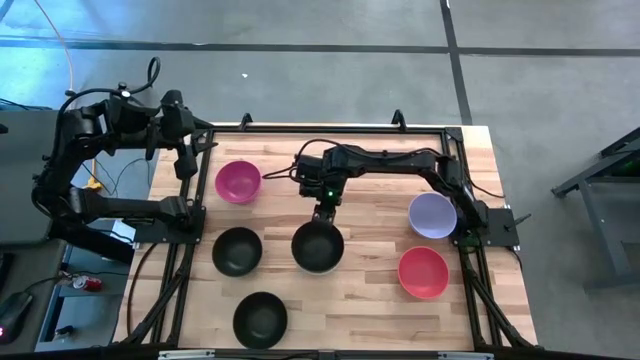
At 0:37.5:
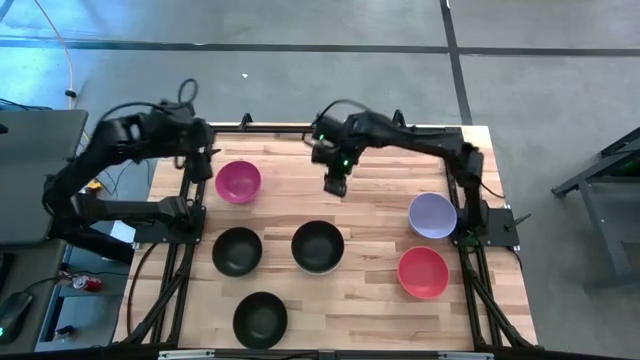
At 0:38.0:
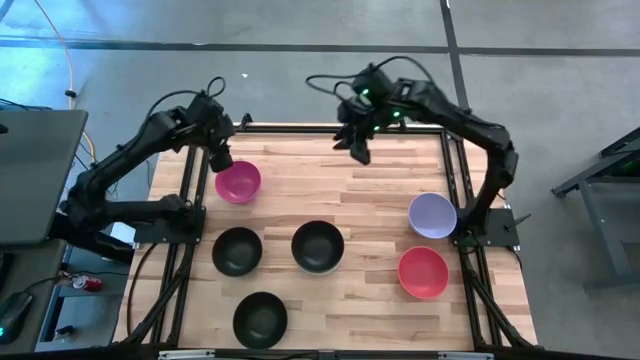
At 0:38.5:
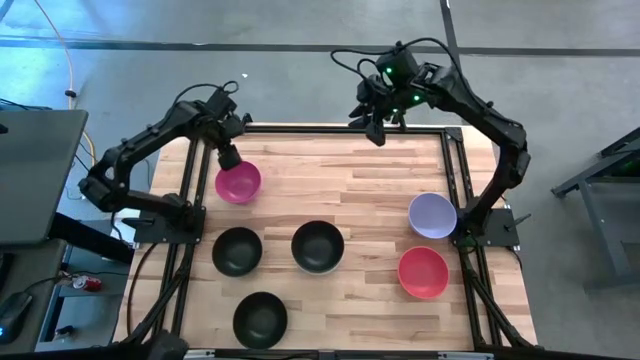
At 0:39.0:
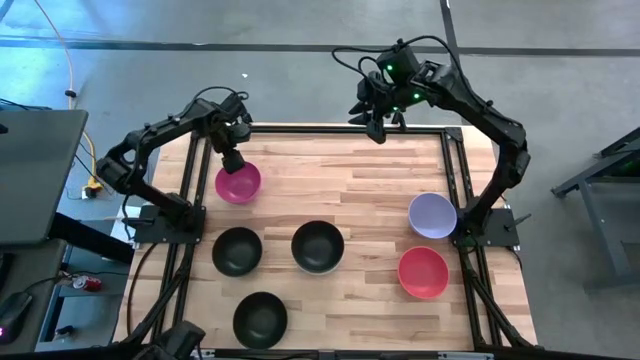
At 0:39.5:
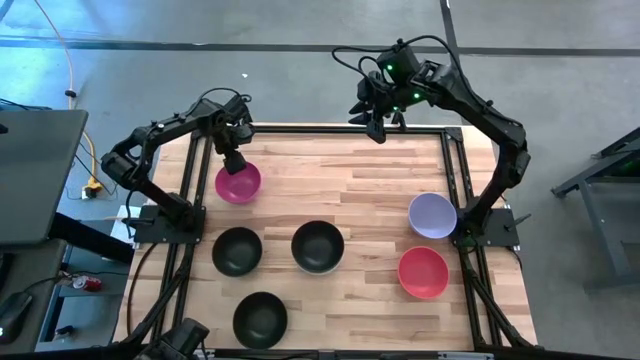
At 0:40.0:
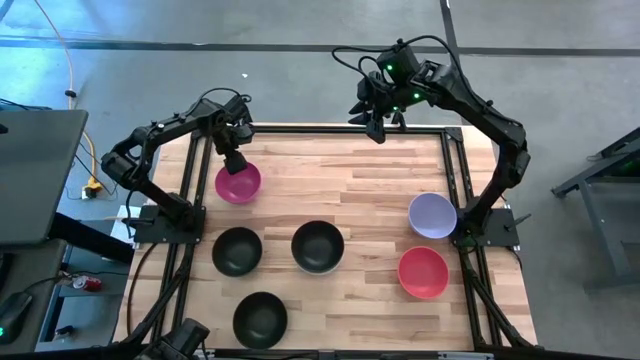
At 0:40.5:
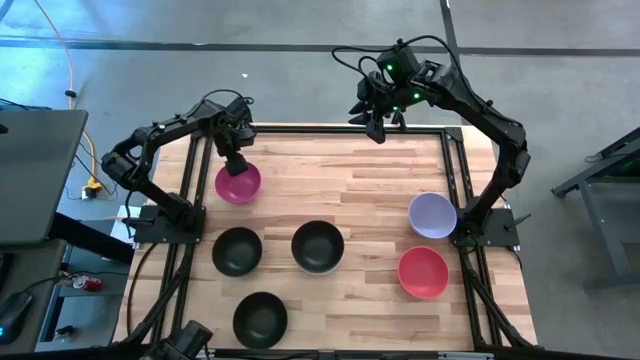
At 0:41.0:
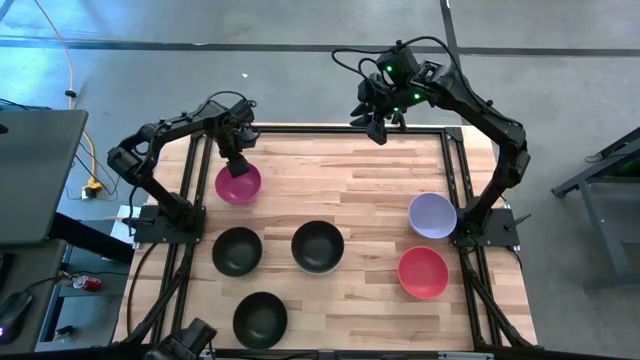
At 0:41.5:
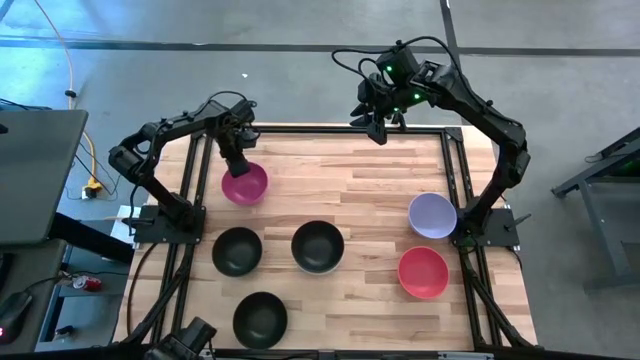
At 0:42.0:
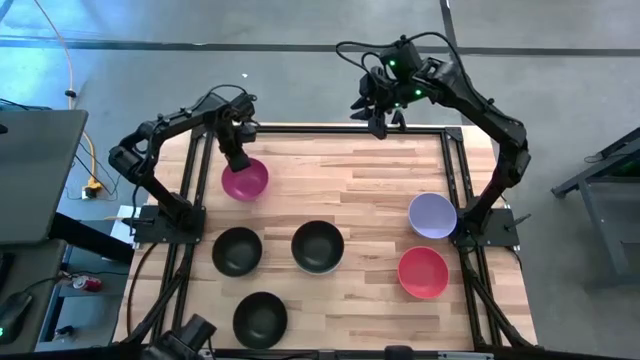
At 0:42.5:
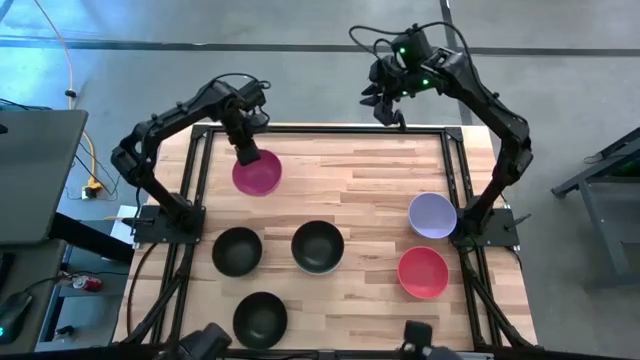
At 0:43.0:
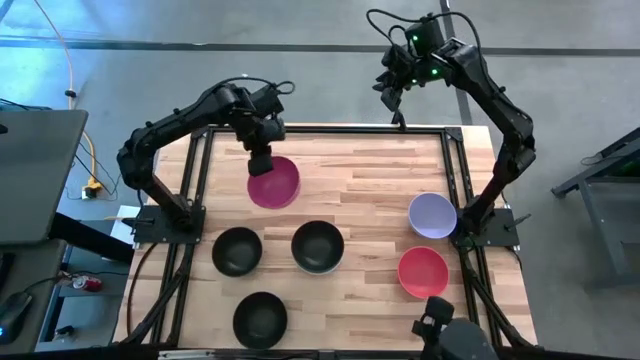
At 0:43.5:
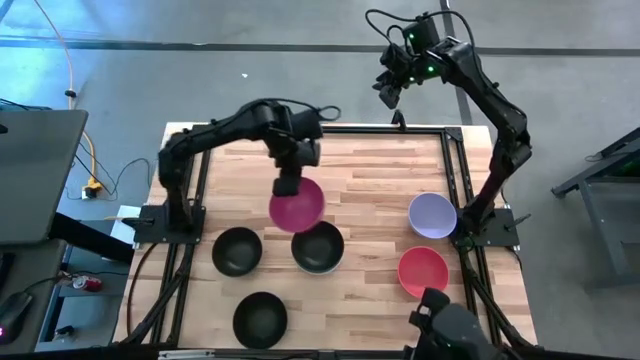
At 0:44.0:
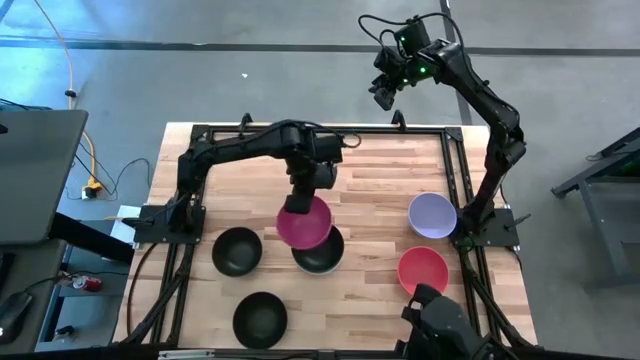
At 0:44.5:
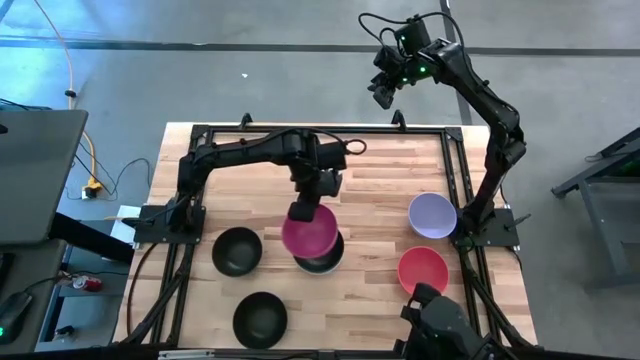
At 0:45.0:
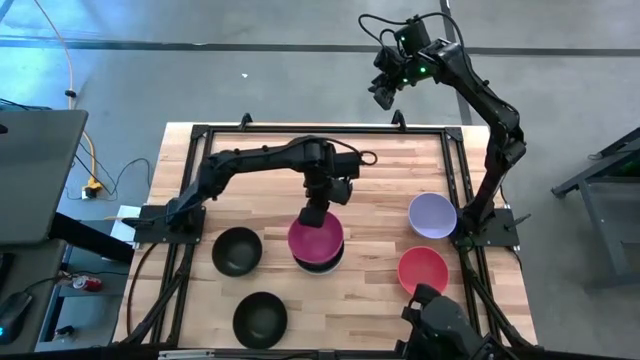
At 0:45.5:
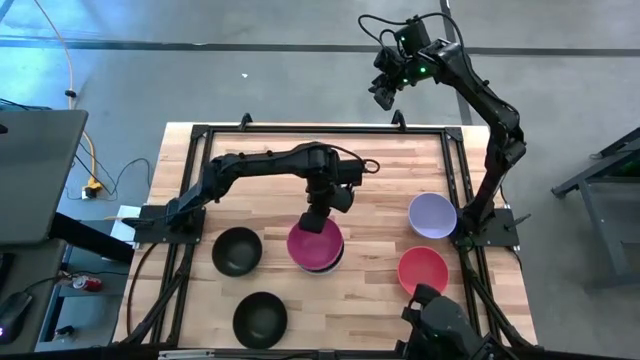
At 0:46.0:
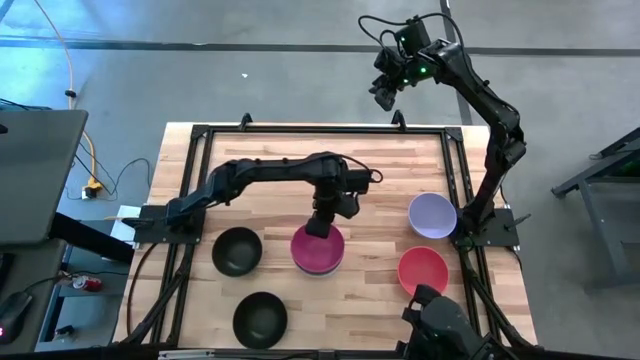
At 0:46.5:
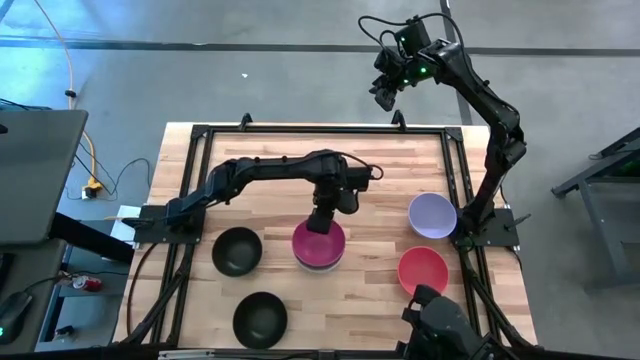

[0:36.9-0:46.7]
Task: Nest bowls inside each other
Stack the pink bowl on top of the black bowl

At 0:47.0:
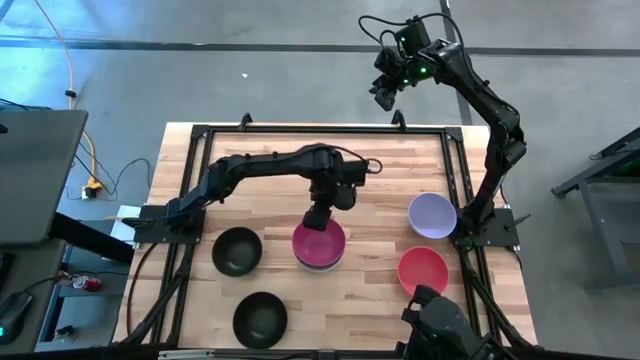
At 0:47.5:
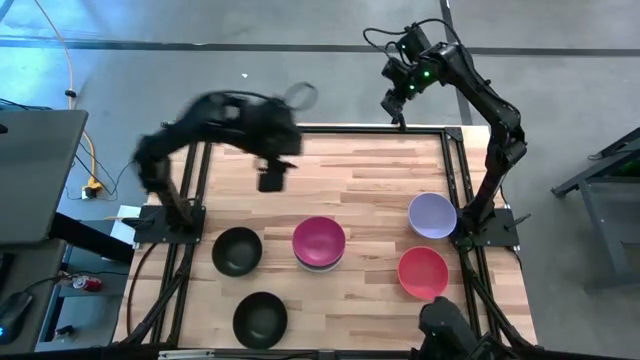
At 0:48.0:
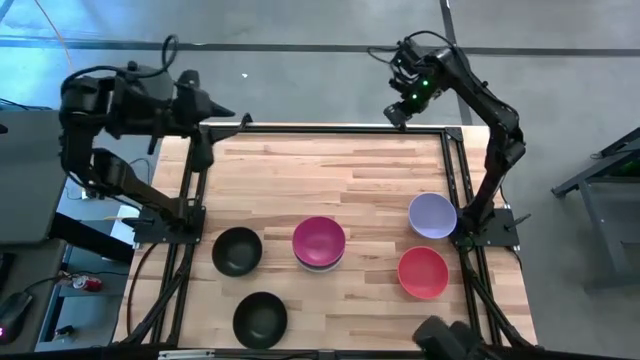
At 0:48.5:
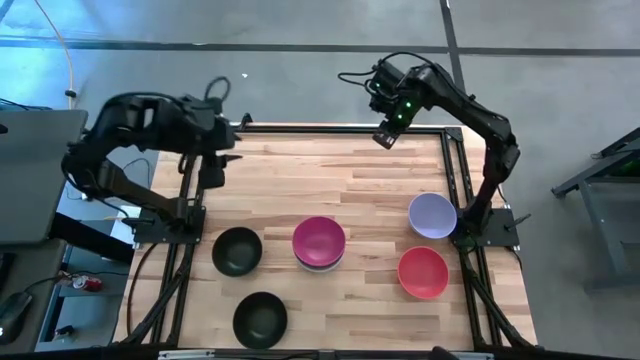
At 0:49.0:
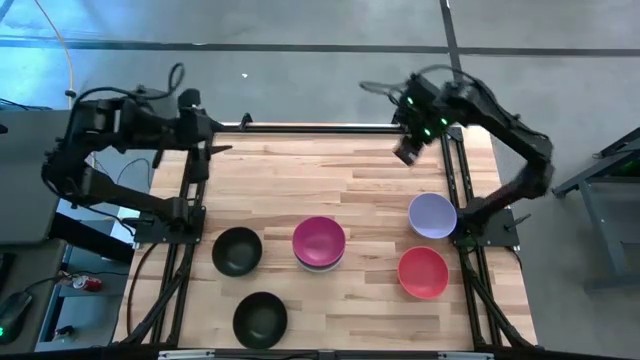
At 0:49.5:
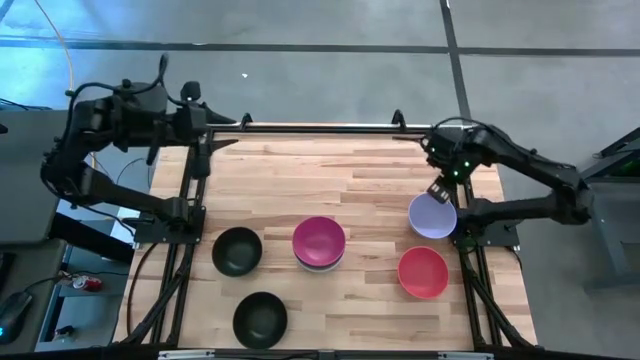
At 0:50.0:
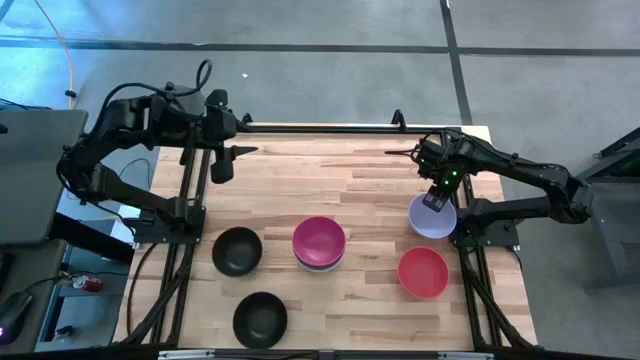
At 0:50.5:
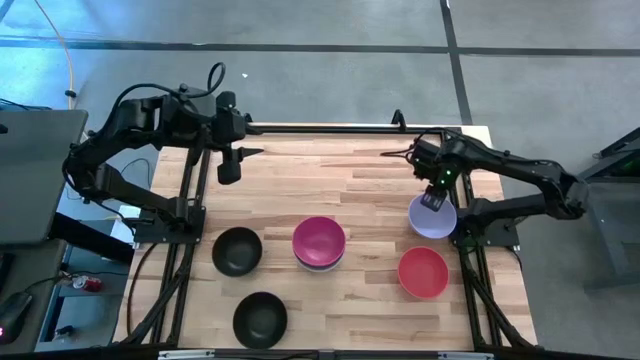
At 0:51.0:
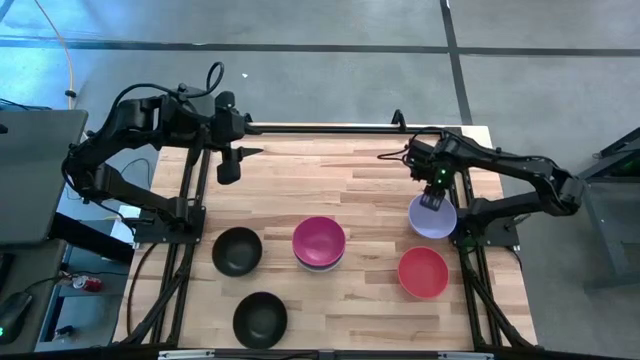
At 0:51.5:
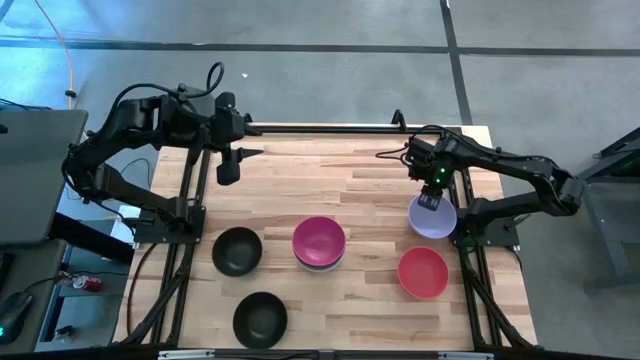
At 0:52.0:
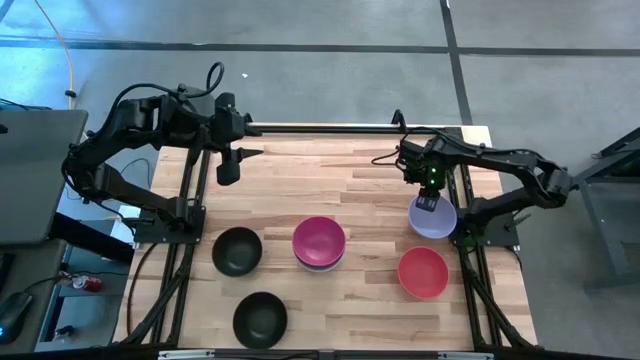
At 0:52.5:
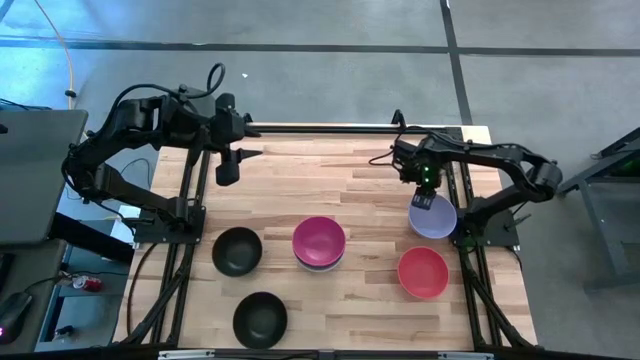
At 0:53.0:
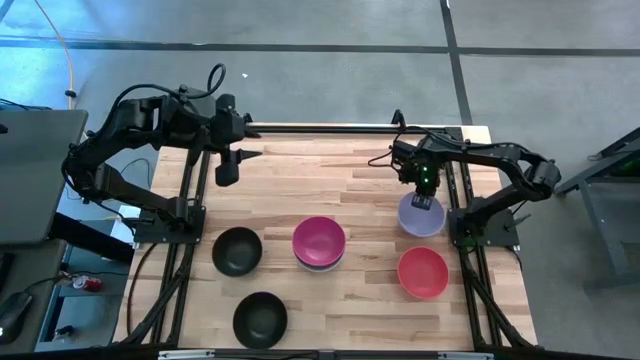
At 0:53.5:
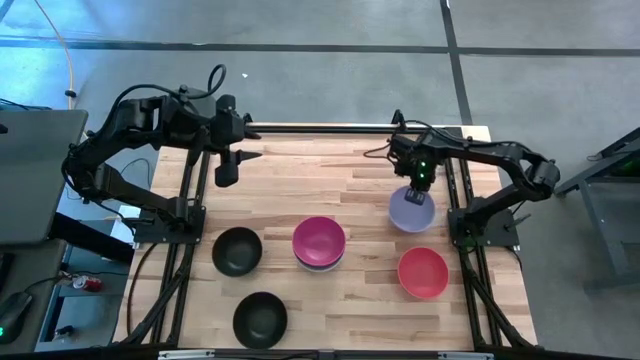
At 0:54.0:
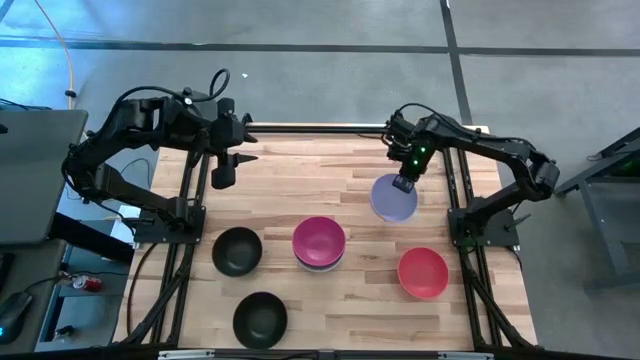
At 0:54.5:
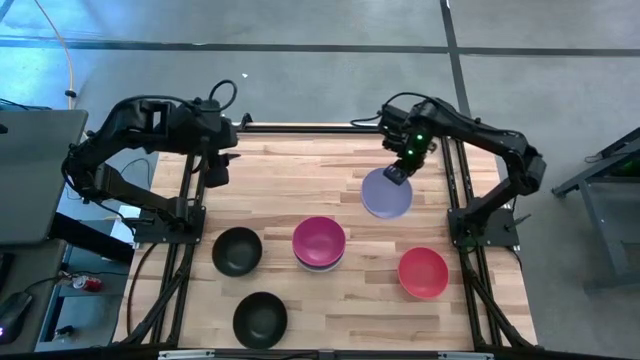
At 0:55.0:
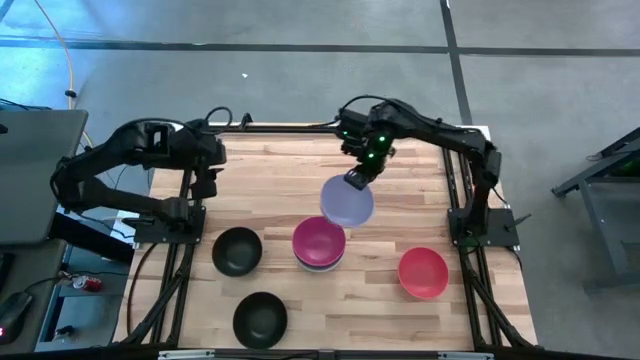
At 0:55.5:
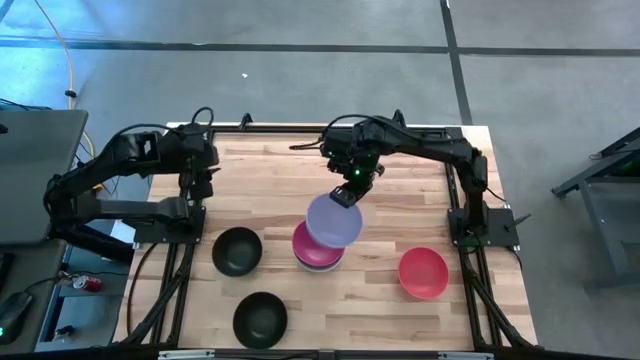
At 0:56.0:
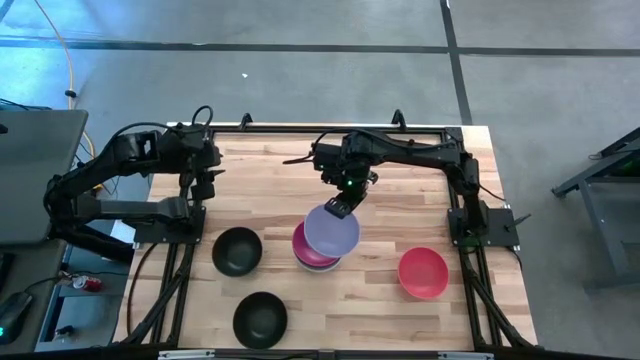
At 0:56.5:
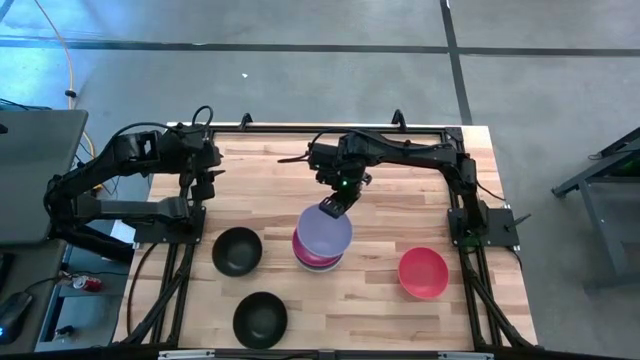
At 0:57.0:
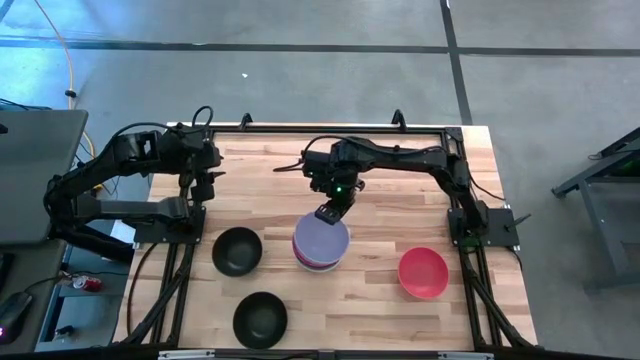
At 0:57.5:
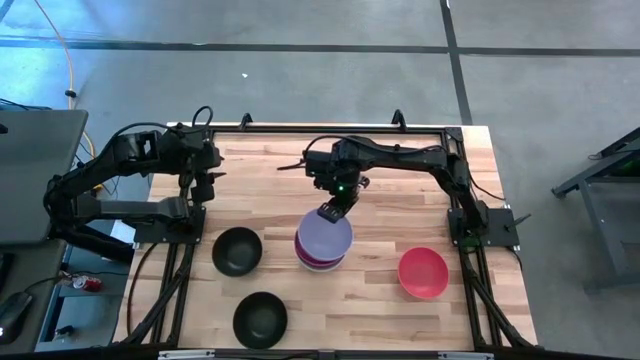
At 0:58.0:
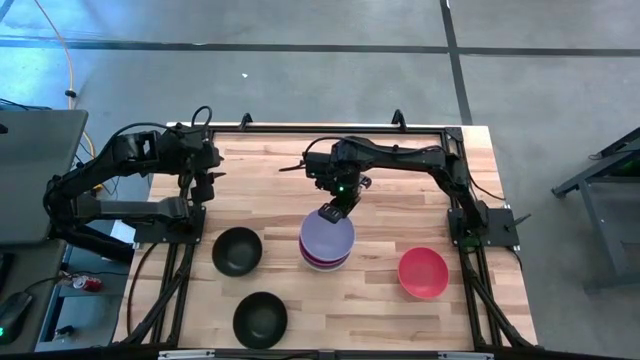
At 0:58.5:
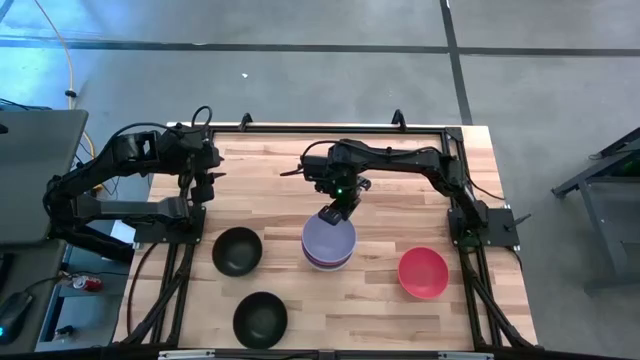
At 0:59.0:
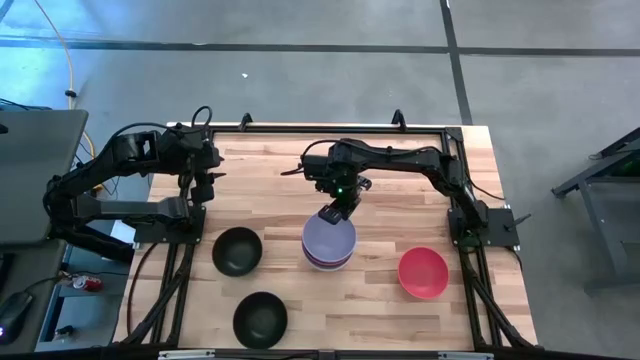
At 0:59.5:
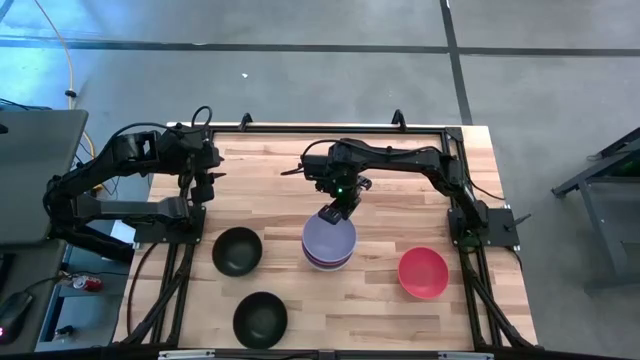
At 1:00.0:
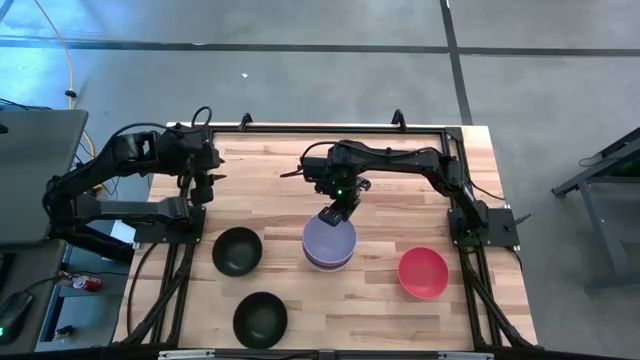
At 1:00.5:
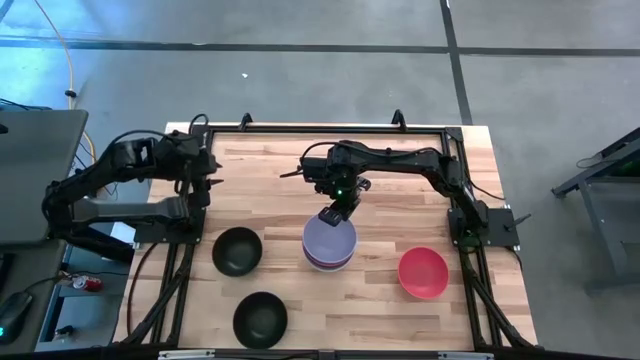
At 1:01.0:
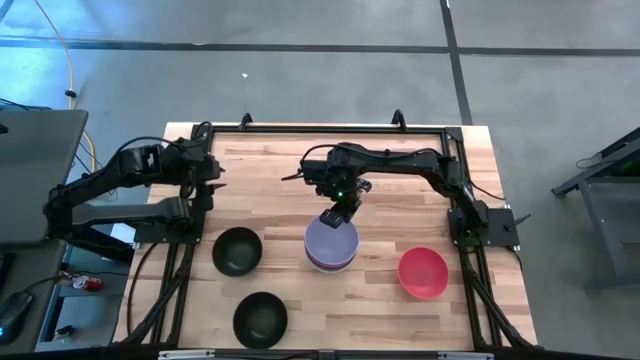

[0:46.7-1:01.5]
Stack the light violet bowl on top of the pink bowl
